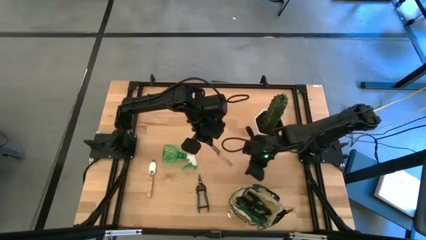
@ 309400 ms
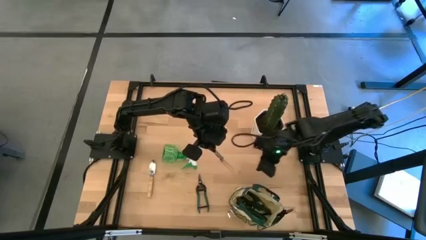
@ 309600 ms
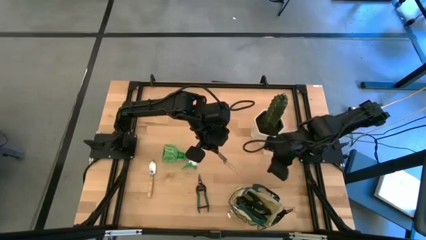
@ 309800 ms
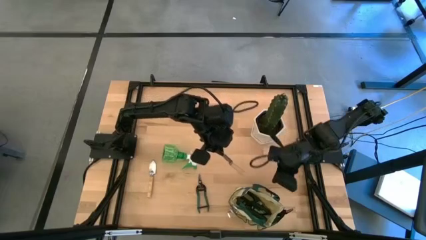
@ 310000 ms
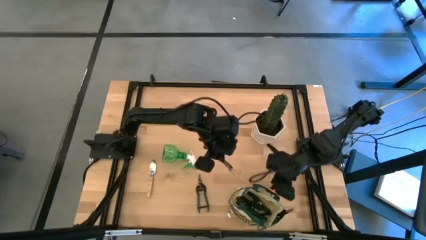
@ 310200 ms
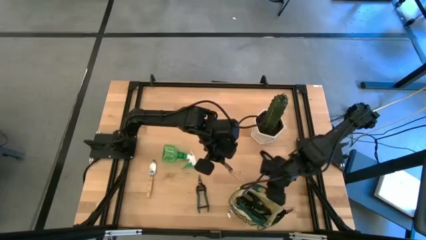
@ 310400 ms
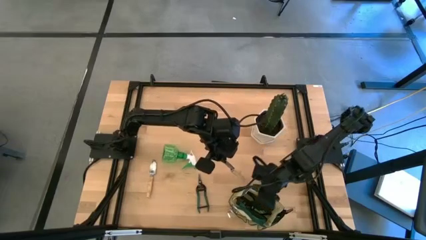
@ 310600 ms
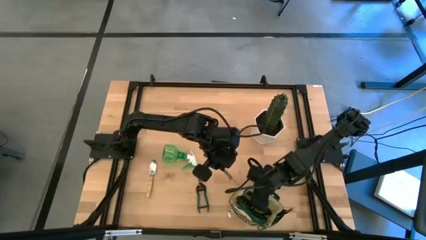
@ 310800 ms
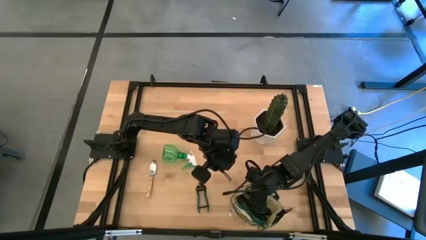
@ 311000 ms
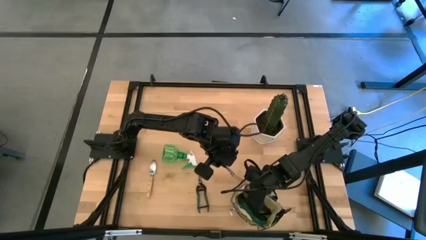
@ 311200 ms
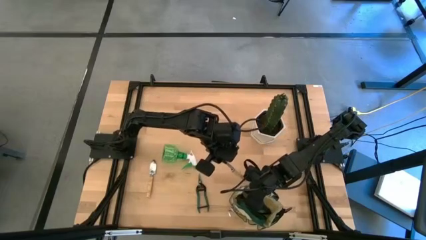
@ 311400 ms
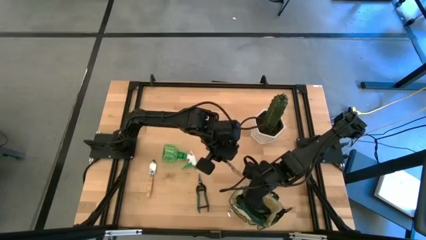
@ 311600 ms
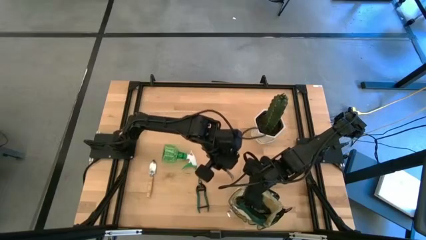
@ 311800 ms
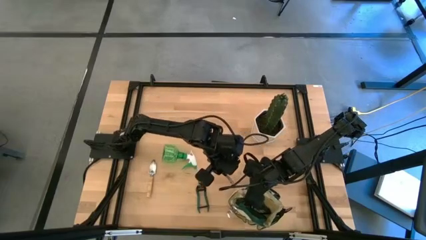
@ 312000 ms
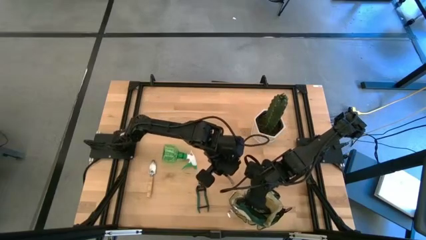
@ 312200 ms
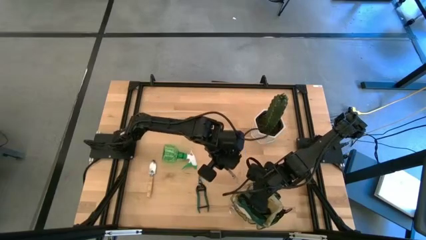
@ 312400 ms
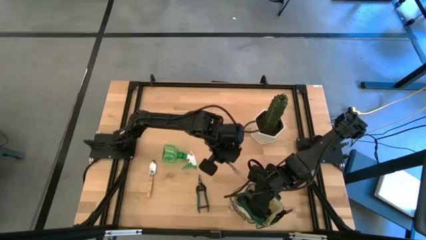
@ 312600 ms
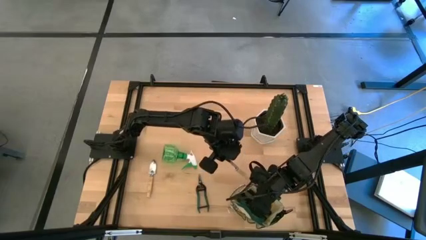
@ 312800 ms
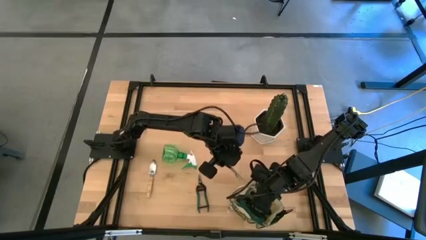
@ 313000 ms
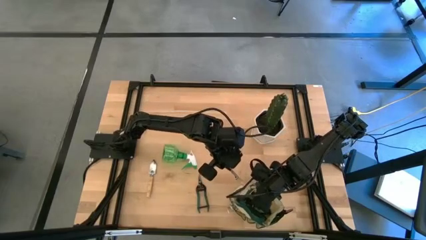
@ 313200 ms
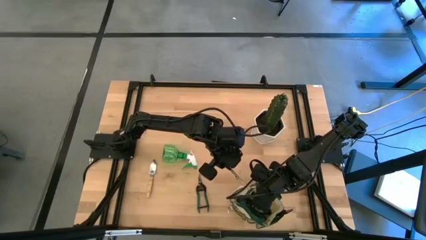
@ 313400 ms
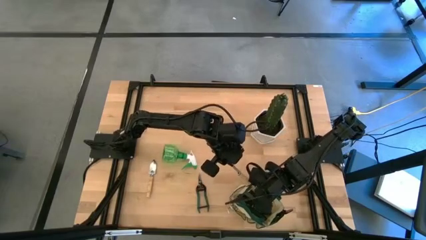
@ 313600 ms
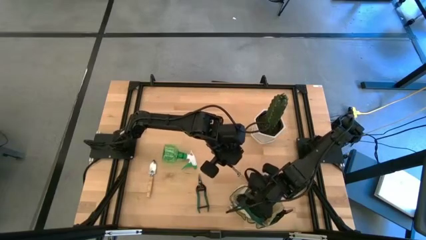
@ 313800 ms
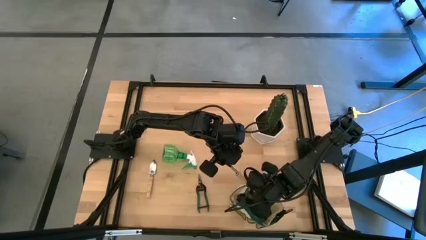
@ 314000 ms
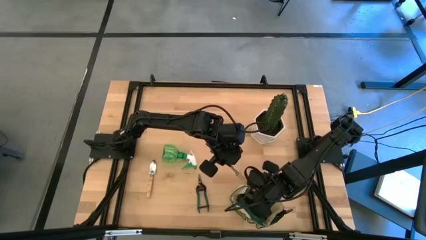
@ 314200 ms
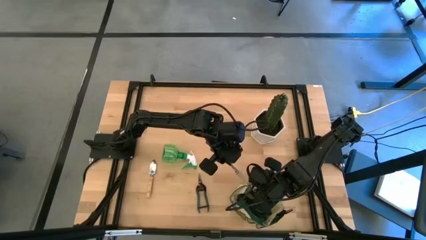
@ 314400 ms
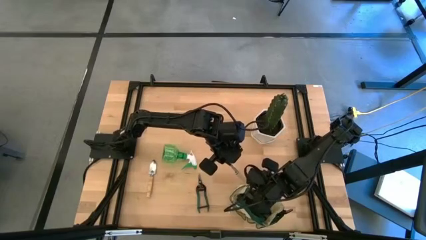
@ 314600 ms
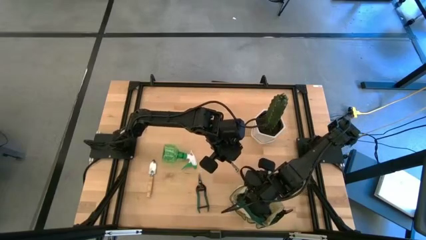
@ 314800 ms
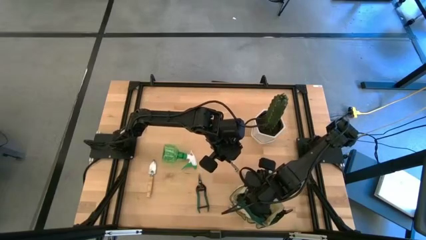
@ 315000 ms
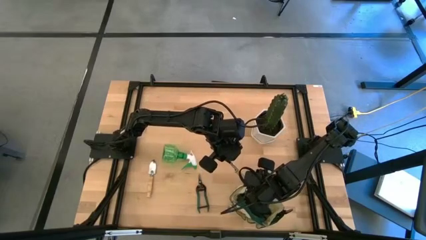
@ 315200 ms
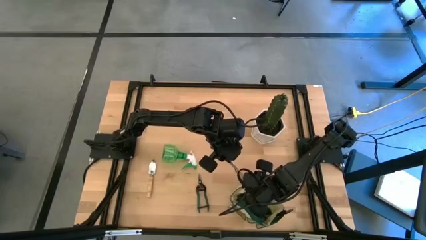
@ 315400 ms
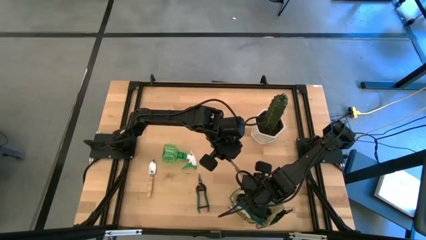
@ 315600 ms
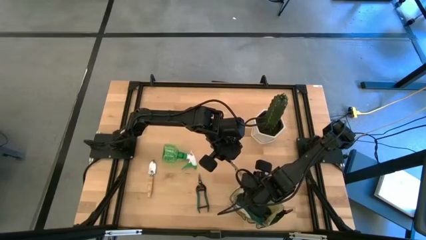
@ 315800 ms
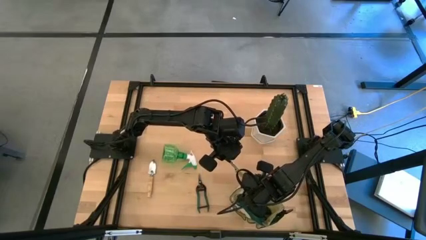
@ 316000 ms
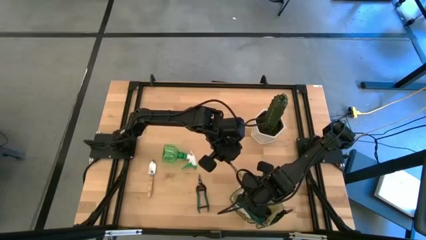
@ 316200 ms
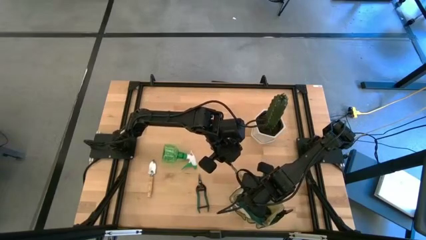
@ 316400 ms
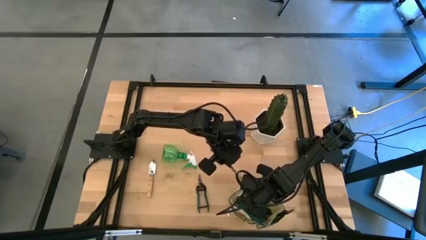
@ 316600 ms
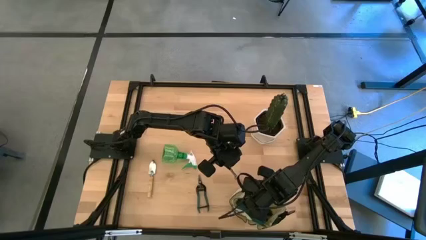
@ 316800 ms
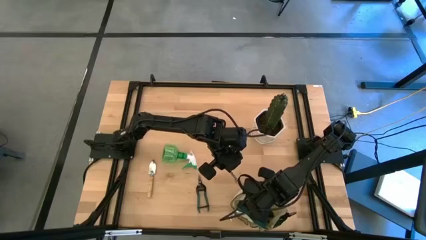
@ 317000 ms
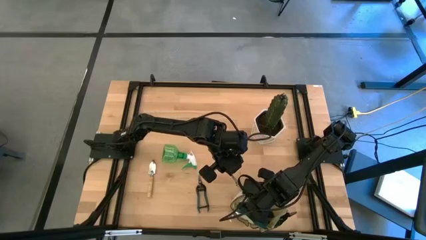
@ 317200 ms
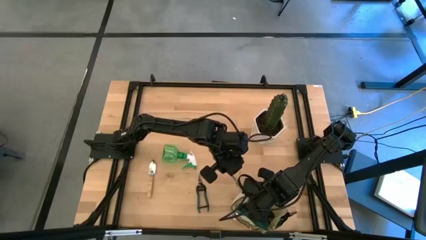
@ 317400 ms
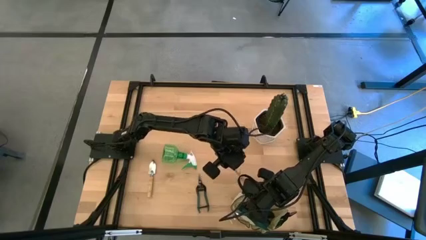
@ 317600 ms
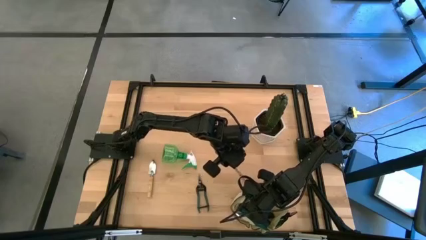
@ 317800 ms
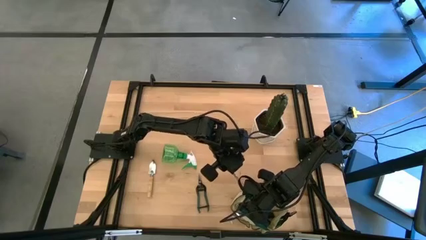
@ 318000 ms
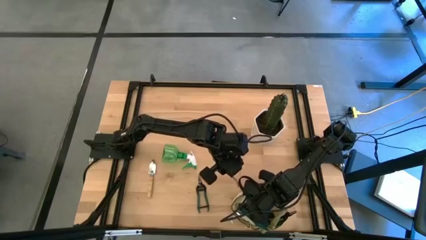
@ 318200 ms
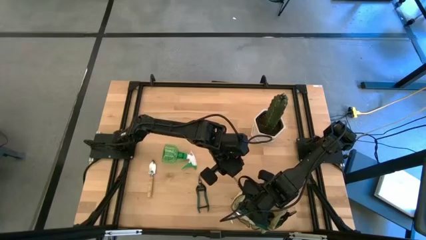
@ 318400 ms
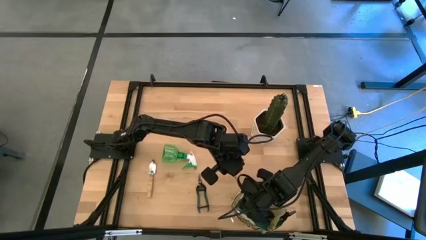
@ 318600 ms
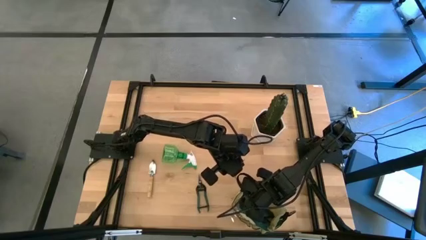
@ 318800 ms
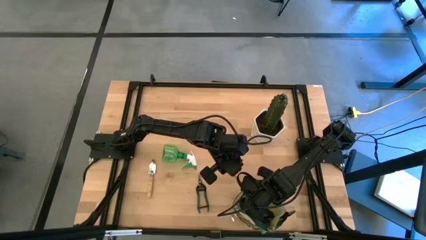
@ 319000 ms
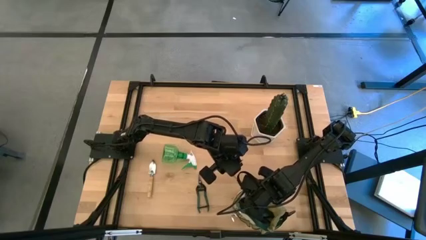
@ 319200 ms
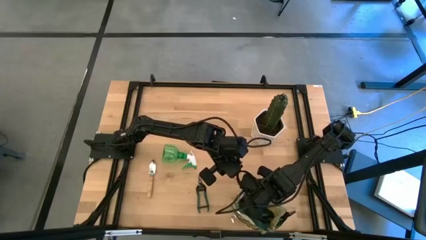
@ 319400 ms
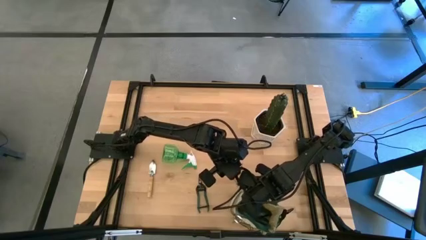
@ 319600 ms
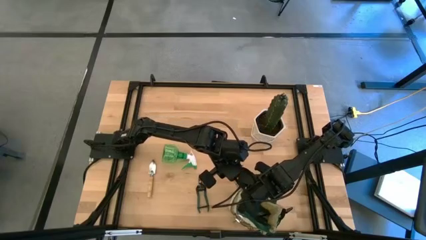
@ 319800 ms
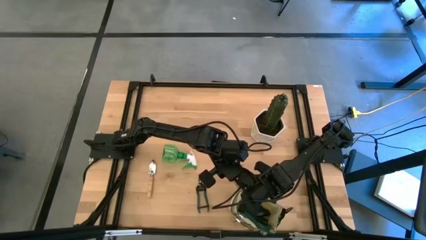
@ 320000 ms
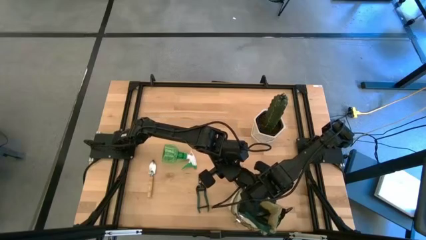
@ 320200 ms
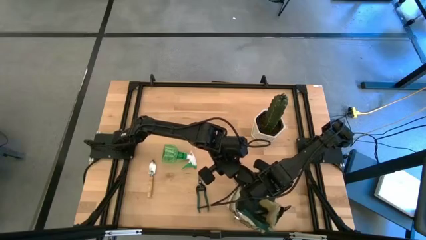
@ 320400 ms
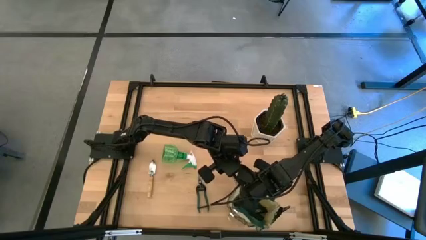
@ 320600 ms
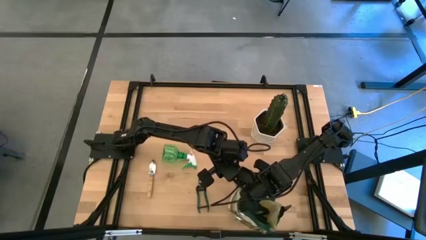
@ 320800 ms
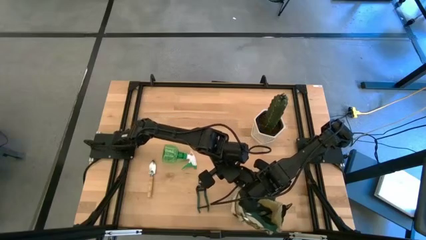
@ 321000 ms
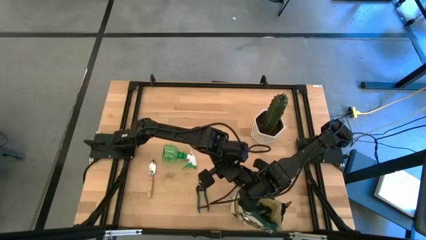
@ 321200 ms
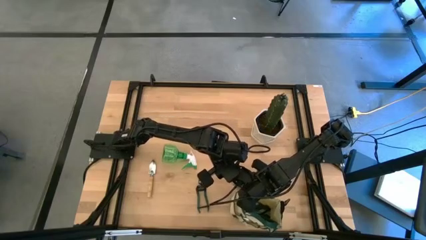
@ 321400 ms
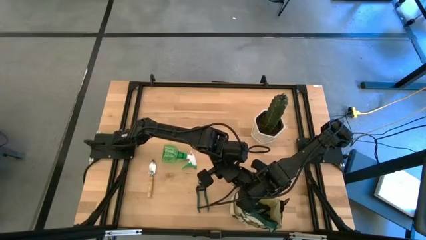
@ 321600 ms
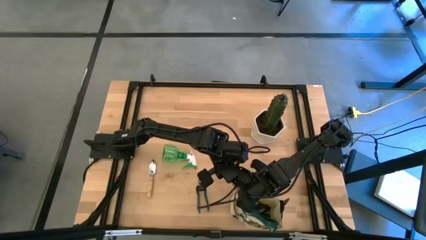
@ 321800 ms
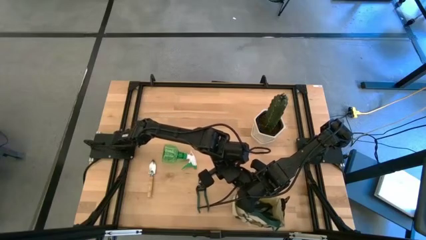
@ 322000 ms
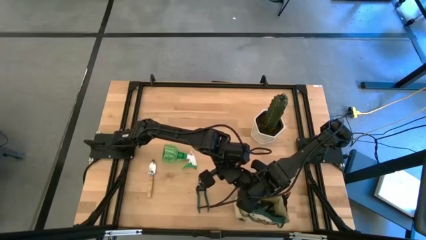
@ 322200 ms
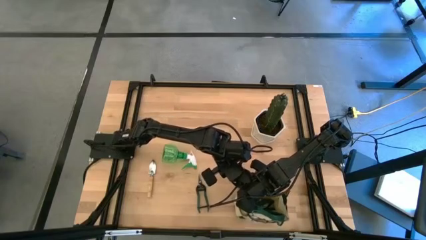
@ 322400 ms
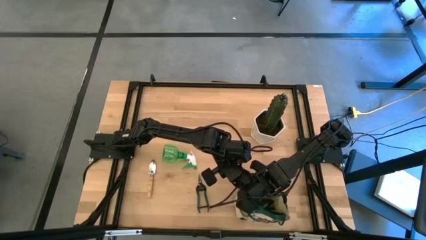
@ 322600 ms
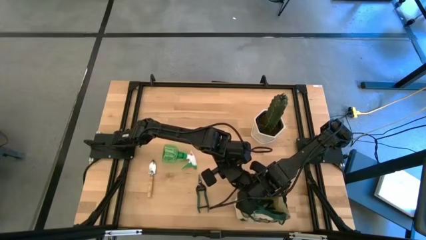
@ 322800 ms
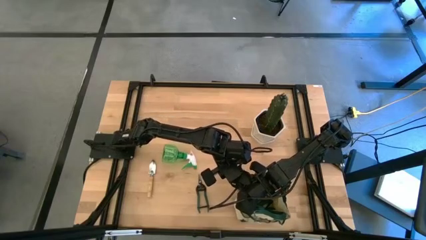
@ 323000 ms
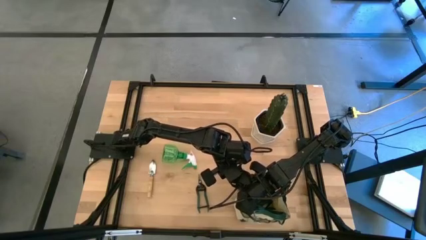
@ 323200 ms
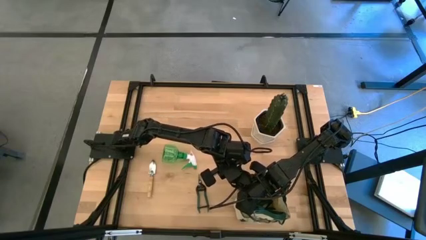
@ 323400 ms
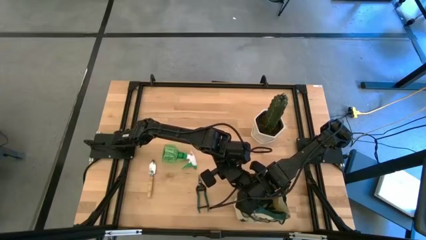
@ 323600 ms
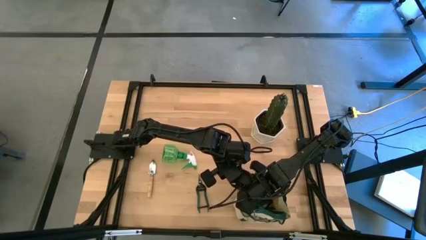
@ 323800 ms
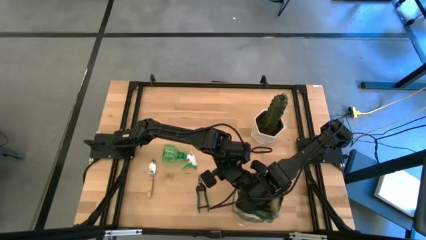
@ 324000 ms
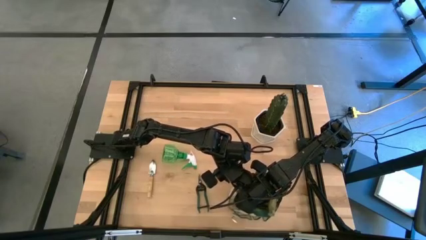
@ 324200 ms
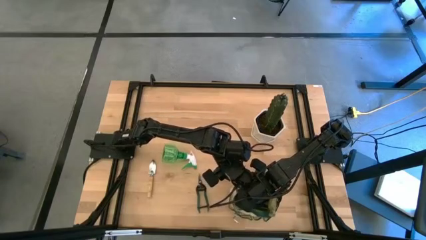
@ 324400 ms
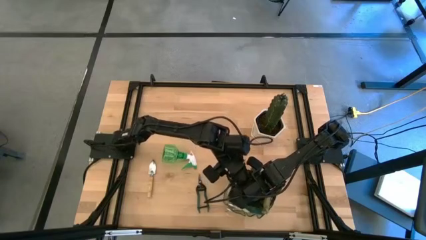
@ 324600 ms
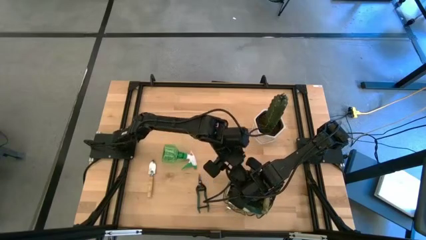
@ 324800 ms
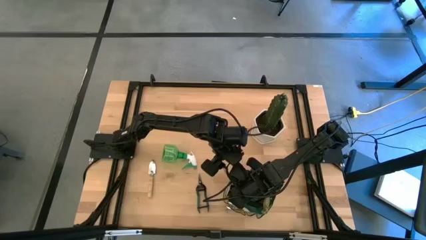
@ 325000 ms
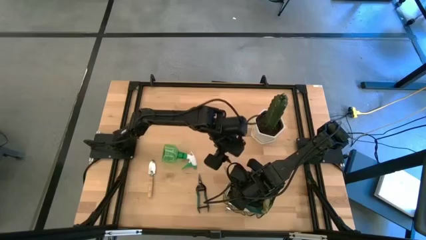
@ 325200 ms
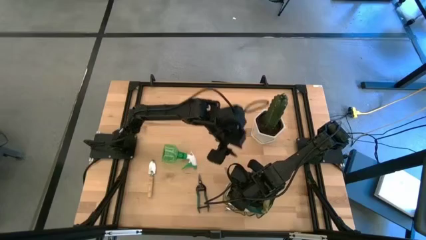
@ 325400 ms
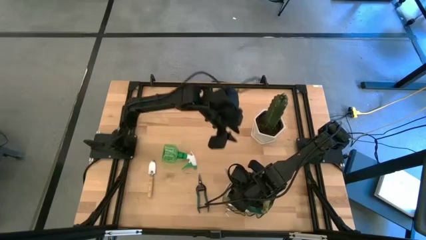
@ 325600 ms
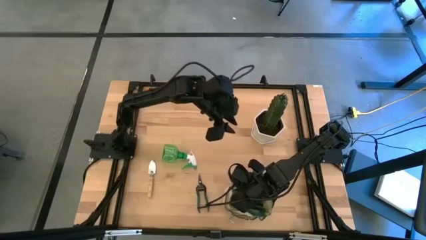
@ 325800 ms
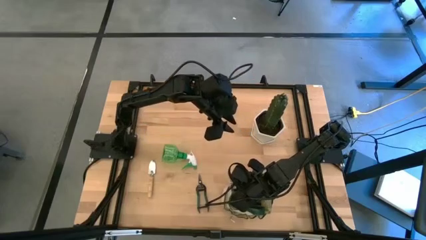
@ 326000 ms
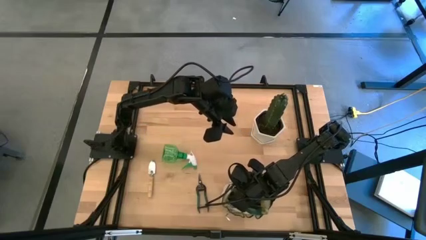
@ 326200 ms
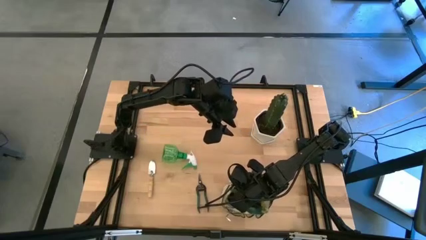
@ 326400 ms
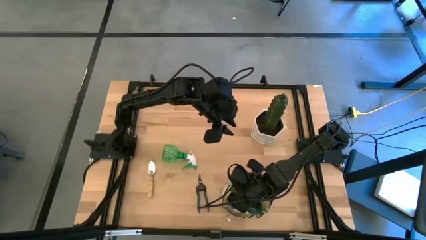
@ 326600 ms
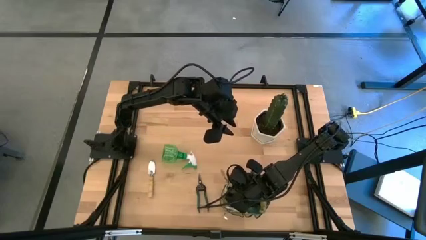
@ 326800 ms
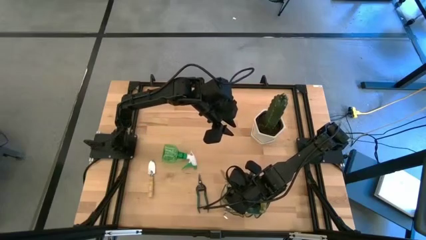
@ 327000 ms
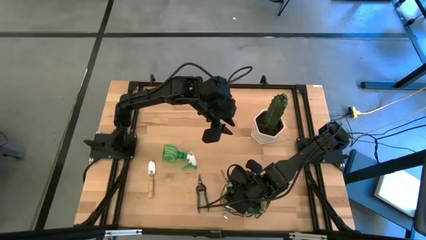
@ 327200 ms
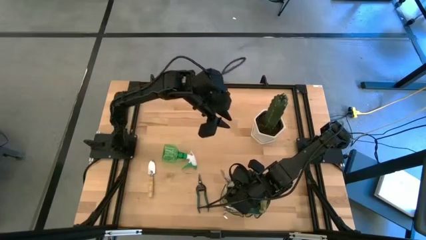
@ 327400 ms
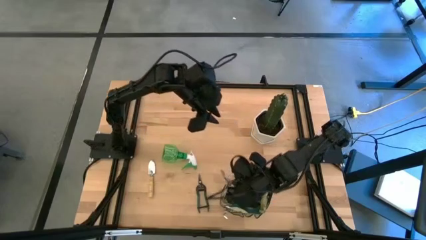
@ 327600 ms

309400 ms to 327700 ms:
Task: Pick & Place Garden tools in Gardening bag
Put the right hand trowel into the side pocket of the white bag
